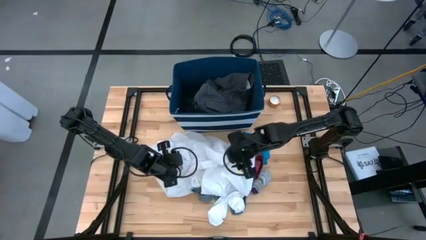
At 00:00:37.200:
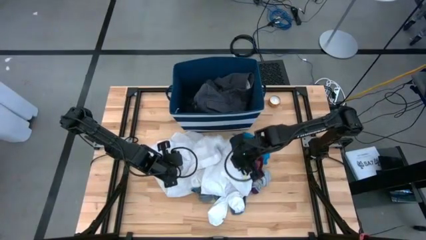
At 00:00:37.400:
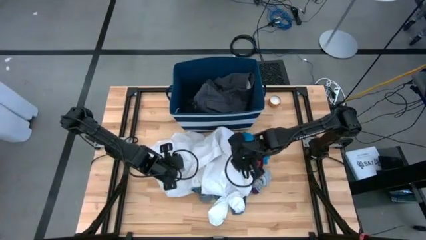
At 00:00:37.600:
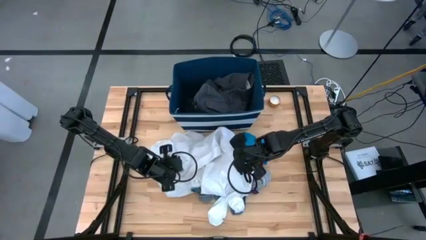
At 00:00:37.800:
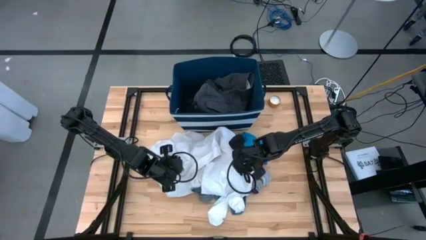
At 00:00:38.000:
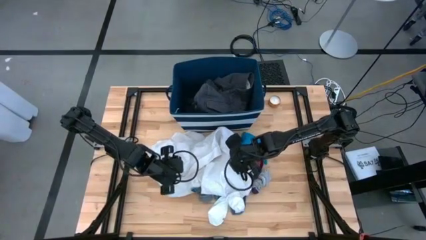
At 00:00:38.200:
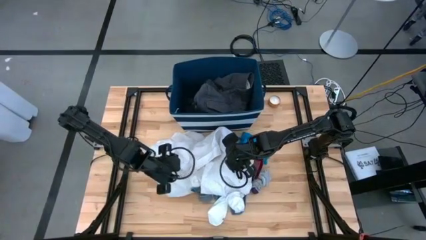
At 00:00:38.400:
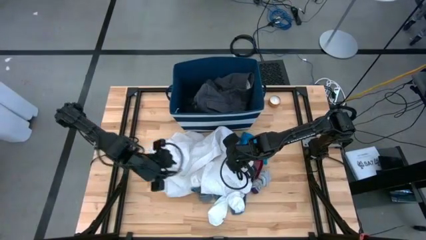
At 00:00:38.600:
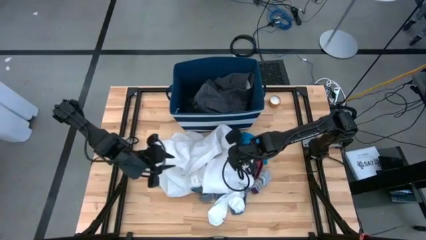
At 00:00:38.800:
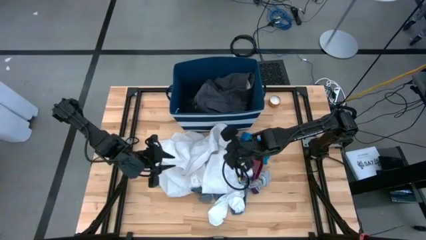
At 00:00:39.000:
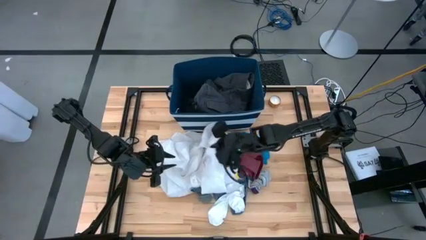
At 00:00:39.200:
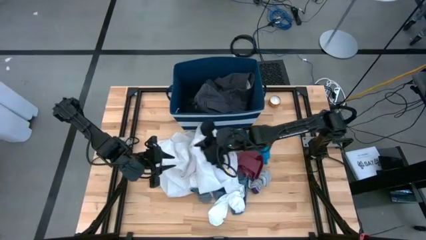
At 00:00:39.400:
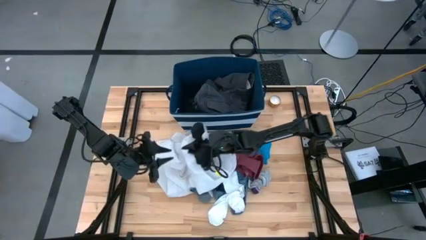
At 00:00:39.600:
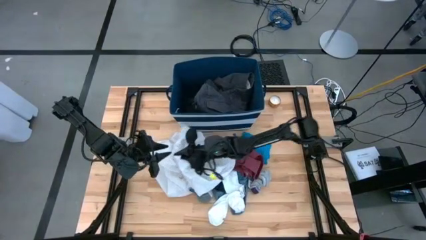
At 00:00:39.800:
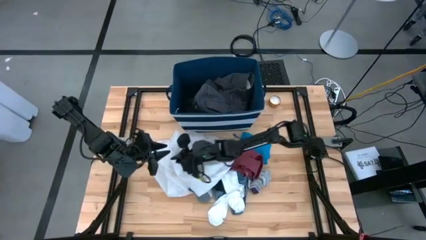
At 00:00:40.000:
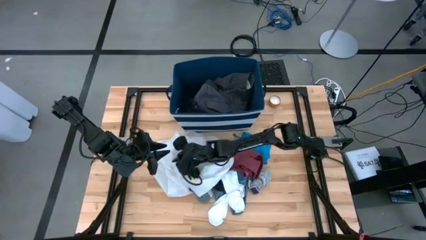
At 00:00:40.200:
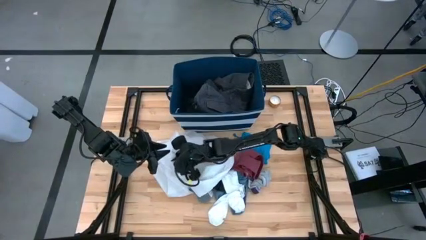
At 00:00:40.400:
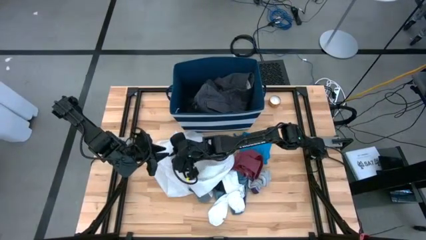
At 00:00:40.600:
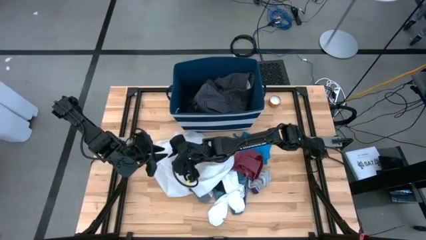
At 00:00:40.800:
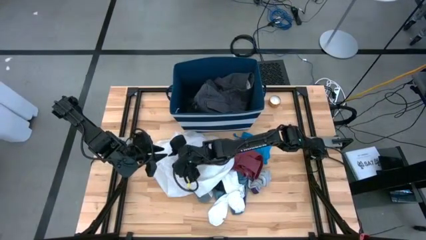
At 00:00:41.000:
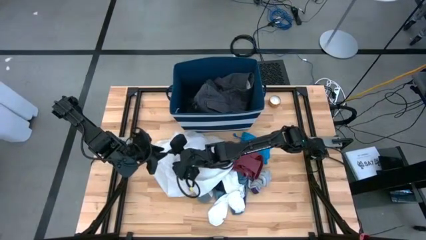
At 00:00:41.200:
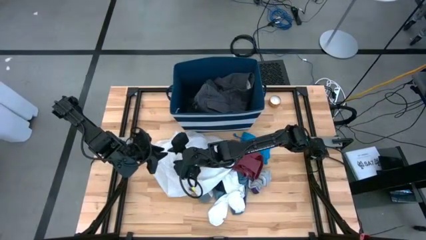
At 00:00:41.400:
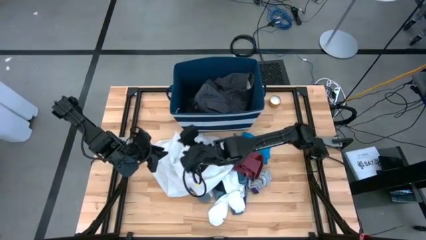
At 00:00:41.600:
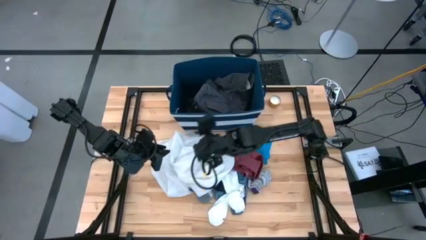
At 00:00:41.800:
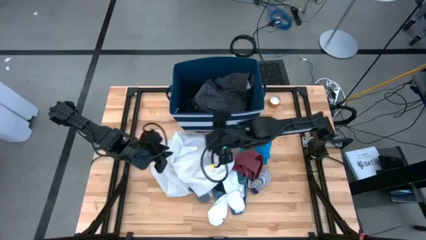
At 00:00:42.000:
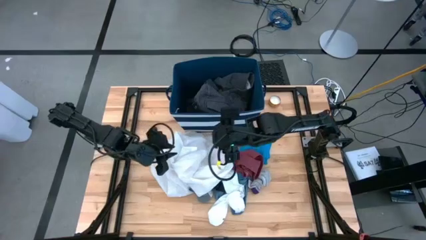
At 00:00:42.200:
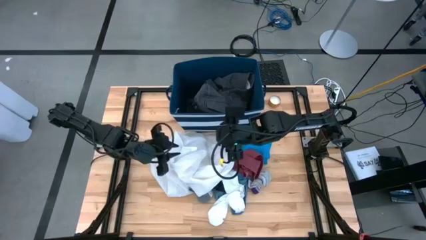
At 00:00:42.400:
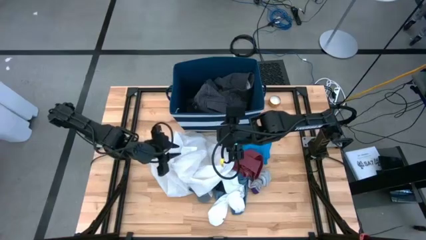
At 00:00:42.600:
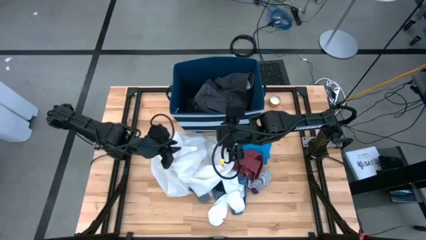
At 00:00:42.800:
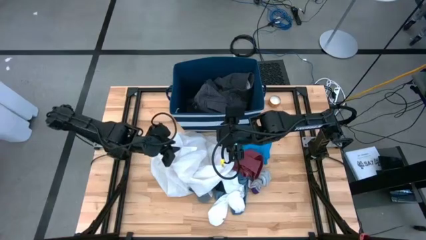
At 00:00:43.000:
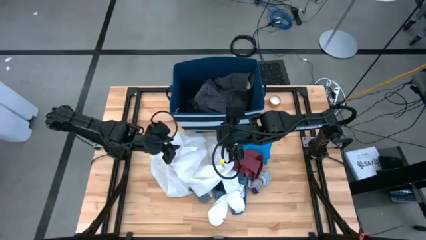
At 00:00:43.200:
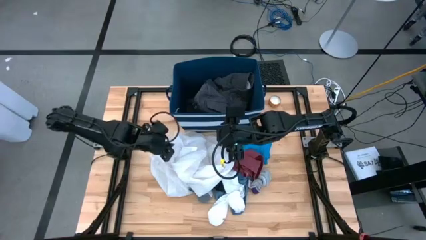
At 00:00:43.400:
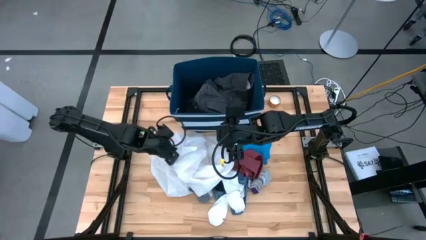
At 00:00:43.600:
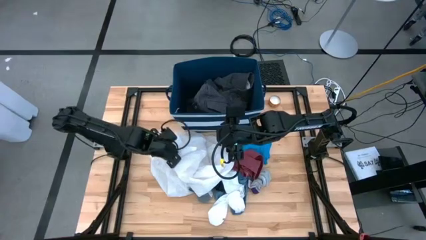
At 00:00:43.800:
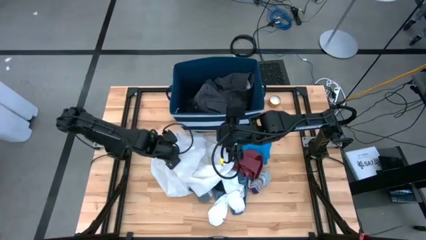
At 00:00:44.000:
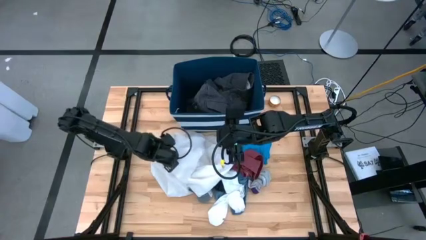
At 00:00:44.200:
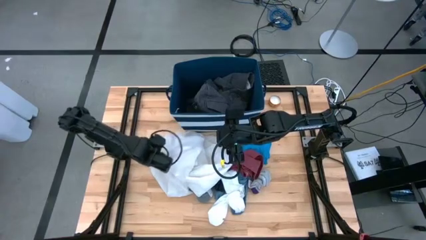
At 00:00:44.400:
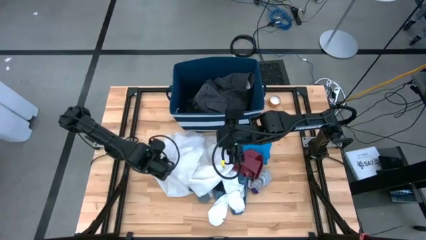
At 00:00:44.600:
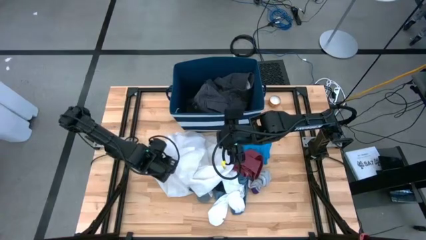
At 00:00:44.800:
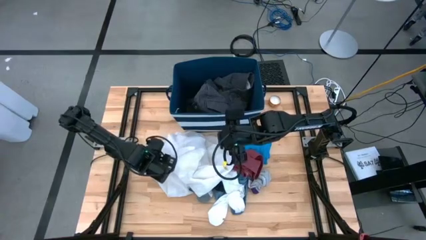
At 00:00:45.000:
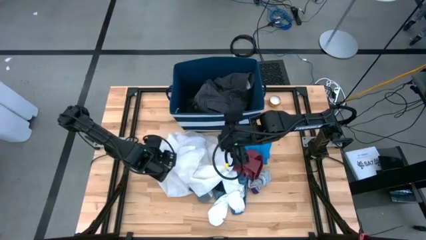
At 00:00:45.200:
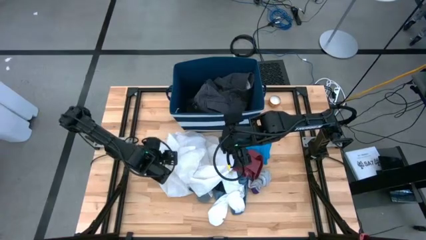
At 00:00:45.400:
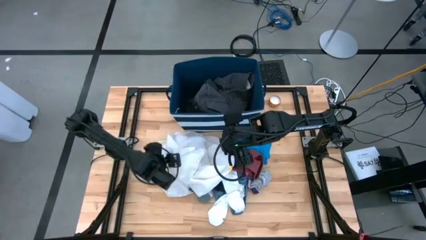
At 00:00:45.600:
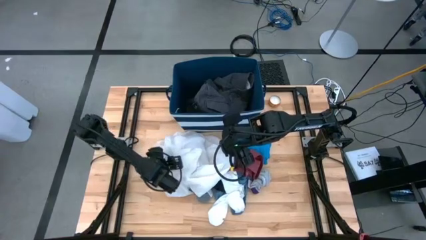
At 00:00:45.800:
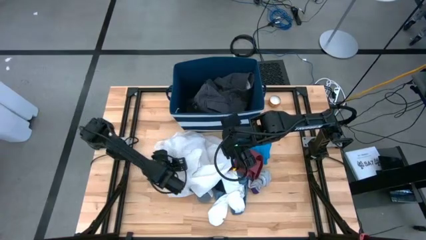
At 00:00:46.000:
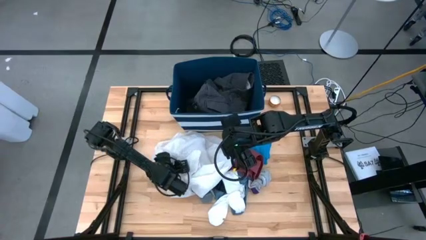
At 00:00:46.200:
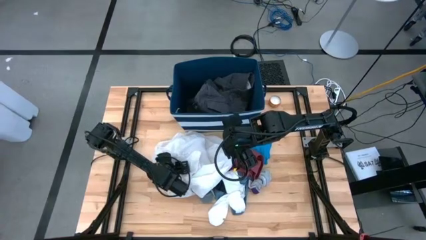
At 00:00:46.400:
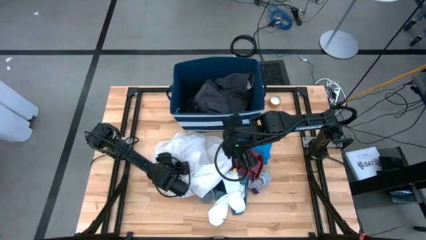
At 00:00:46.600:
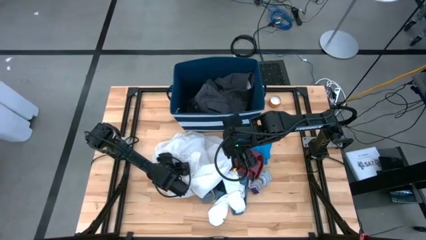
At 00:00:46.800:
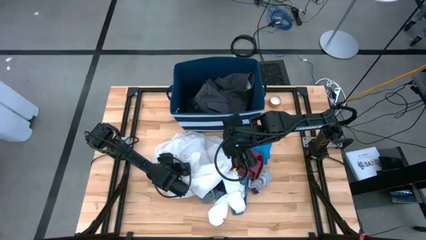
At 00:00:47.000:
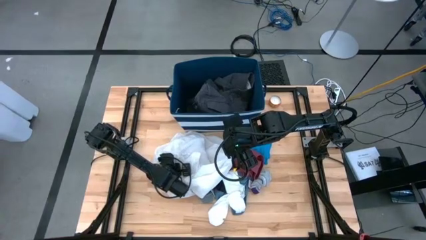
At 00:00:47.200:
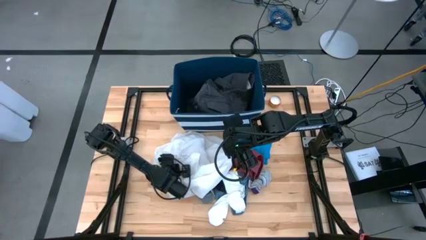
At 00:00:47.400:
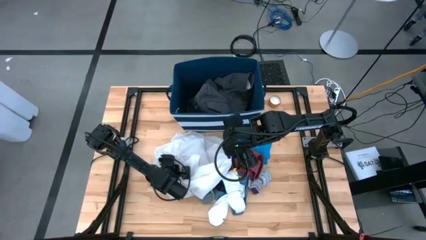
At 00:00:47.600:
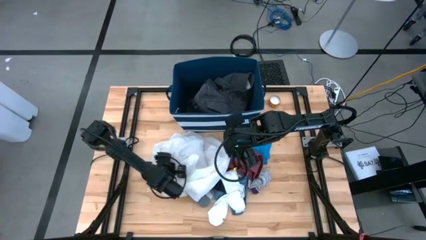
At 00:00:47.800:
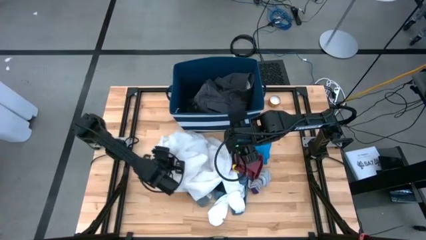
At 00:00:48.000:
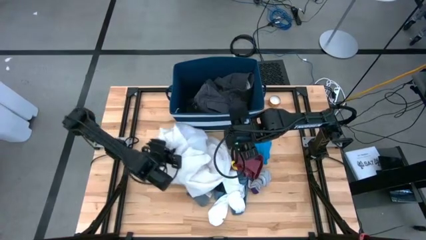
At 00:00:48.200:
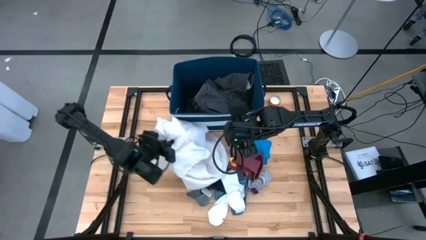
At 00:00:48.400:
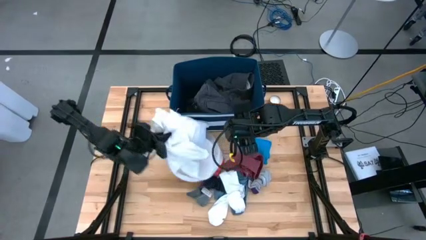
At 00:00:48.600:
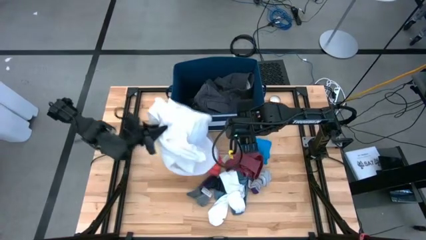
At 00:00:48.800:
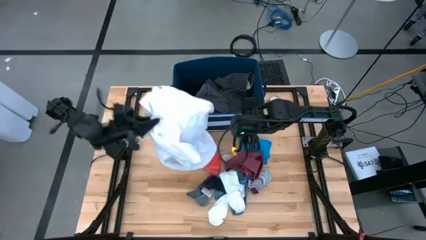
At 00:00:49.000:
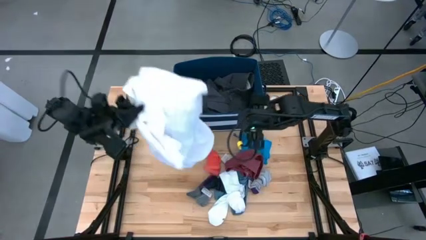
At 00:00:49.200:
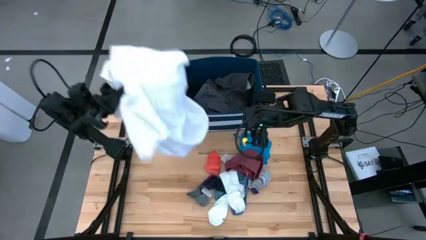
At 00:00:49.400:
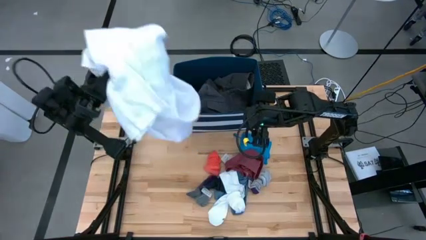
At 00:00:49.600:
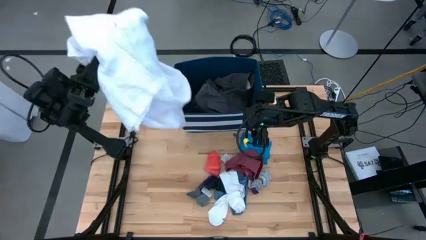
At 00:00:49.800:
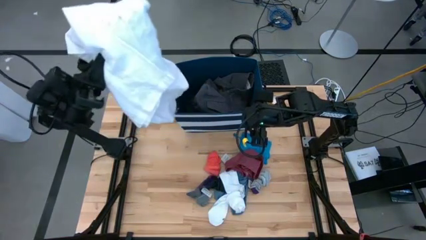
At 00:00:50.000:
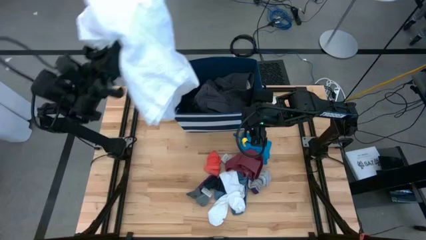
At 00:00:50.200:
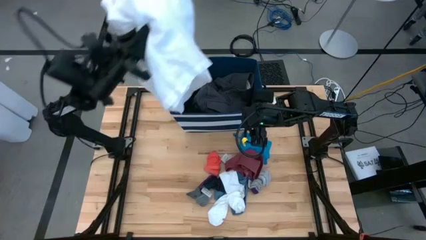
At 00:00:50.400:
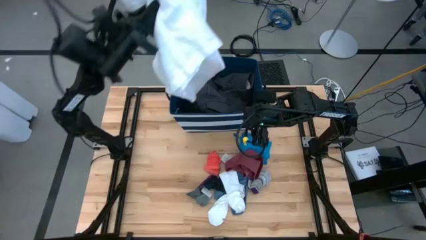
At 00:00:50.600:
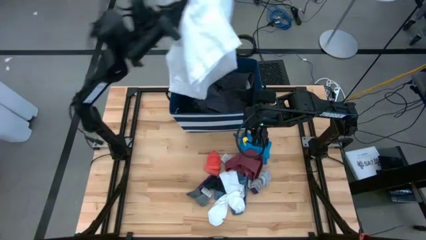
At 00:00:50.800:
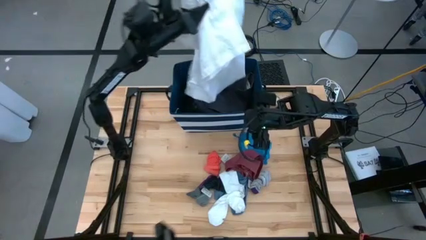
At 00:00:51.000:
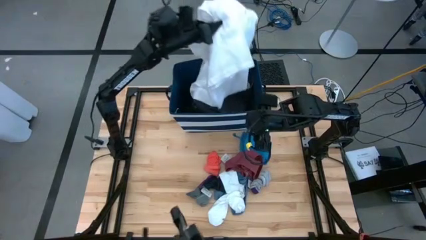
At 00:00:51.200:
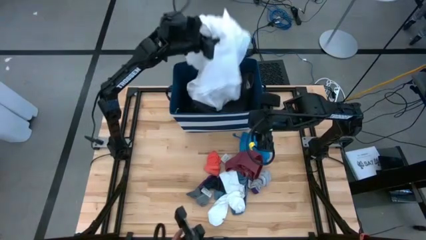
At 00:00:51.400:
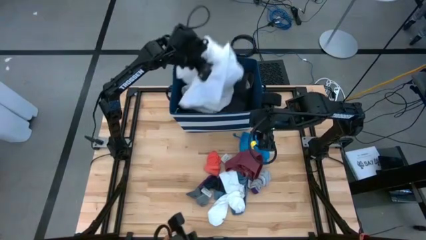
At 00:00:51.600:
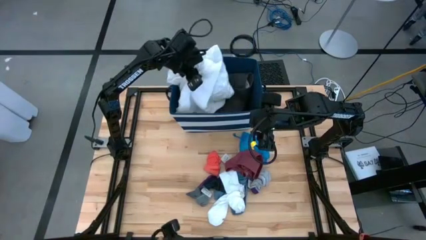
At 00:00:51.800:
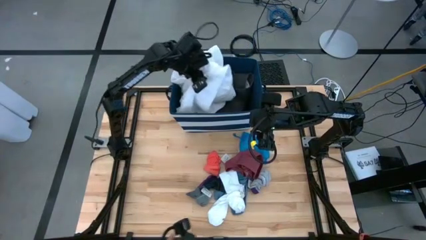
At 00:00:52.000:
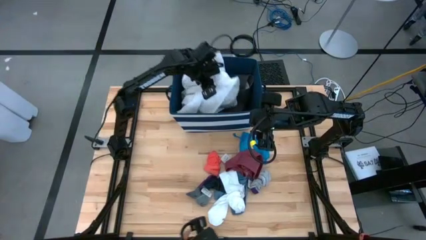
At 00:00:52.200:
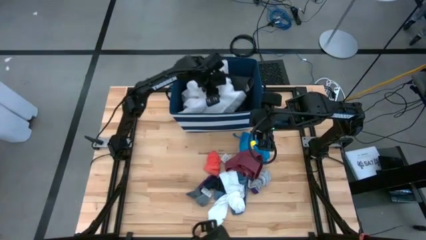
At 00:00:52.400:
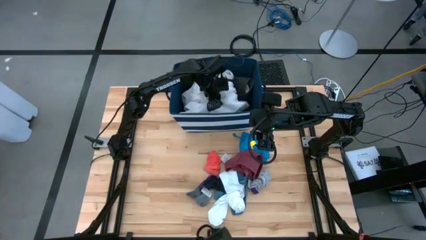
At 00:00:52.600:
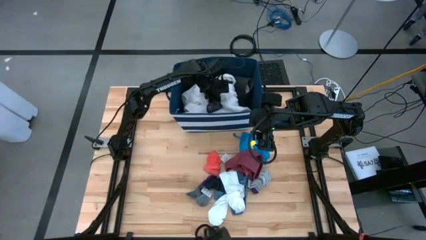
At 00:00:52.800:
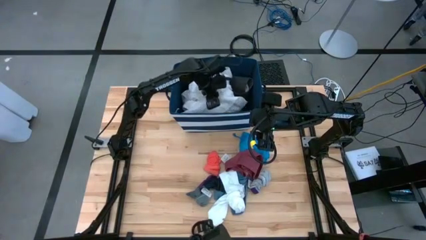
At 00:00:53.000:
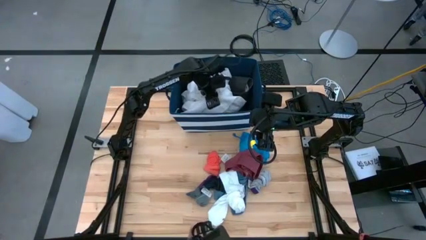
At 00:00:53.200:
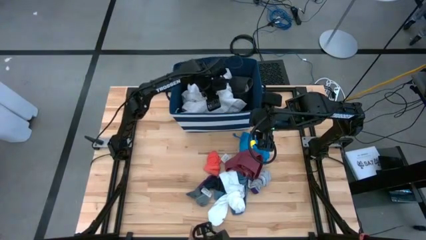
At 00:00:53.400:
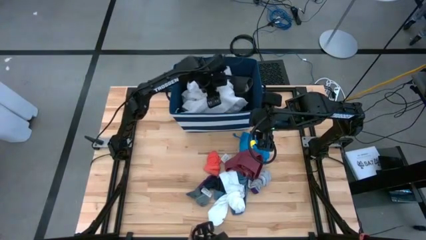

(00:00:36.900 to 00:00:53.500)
Task: Sort clothes
Put the white polo shirt into the blue laundry organizer
